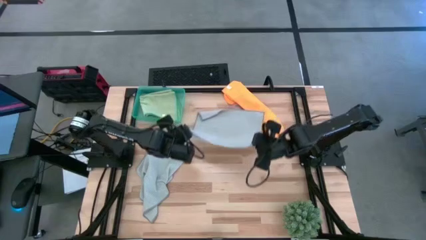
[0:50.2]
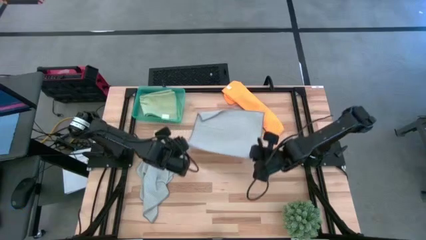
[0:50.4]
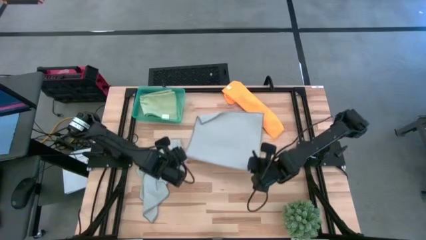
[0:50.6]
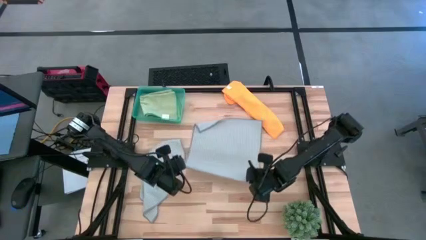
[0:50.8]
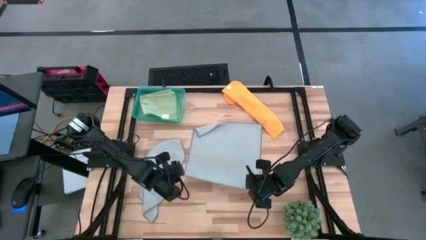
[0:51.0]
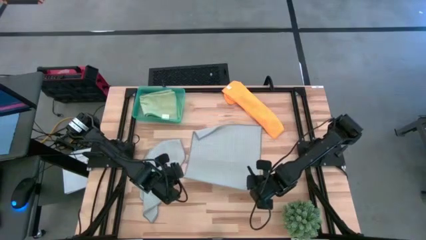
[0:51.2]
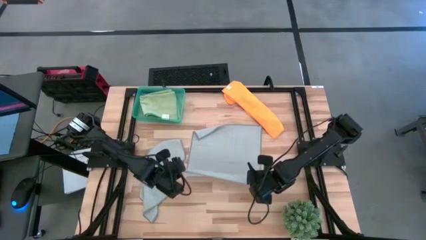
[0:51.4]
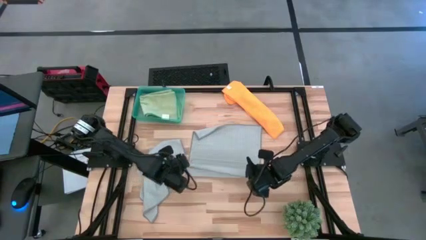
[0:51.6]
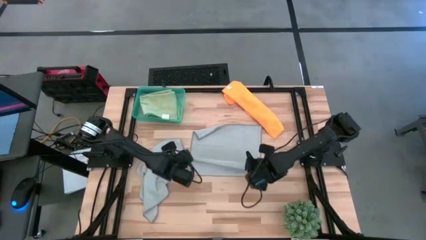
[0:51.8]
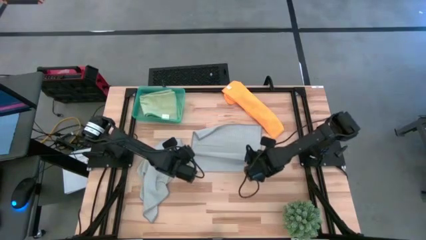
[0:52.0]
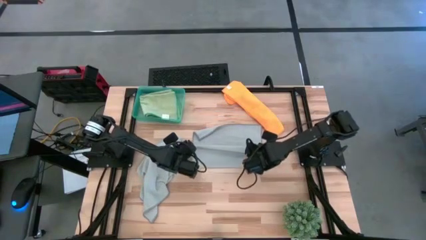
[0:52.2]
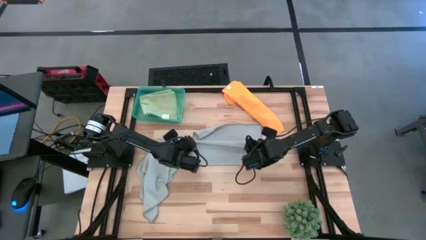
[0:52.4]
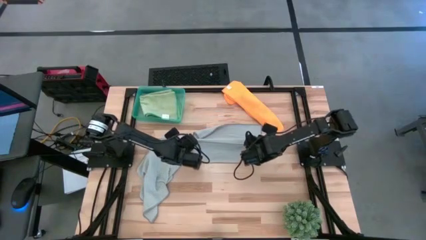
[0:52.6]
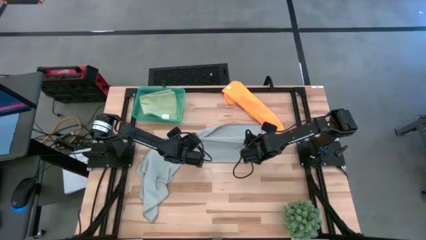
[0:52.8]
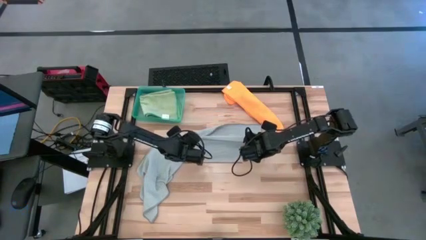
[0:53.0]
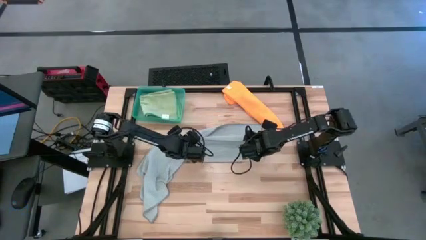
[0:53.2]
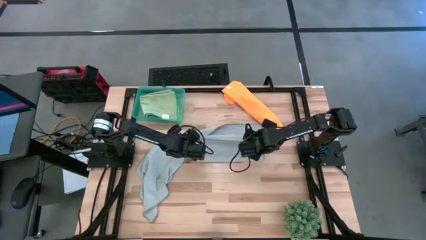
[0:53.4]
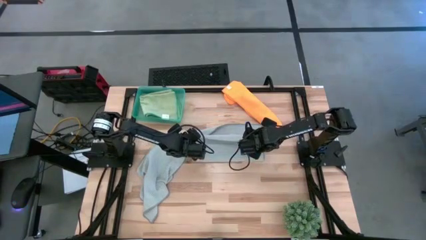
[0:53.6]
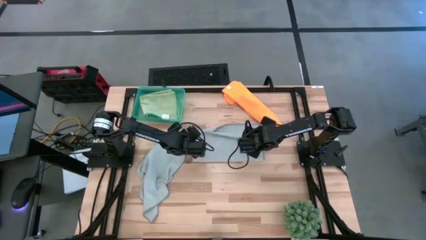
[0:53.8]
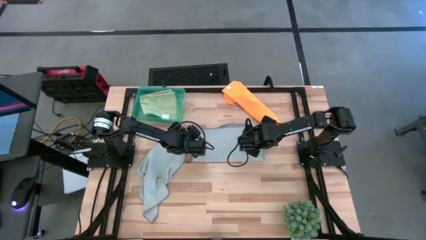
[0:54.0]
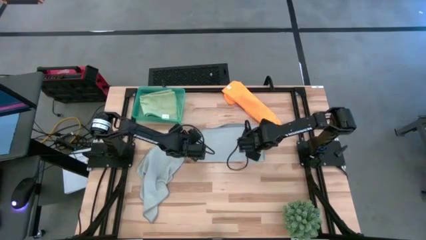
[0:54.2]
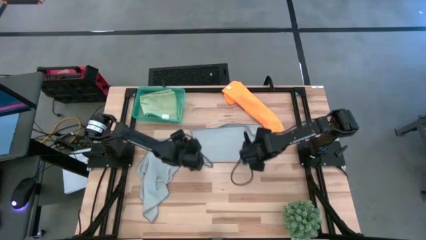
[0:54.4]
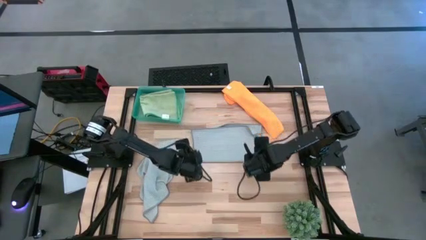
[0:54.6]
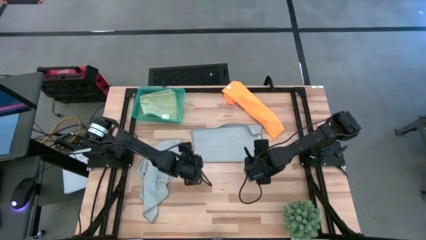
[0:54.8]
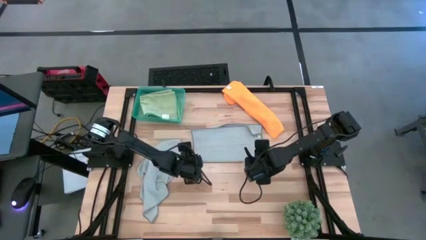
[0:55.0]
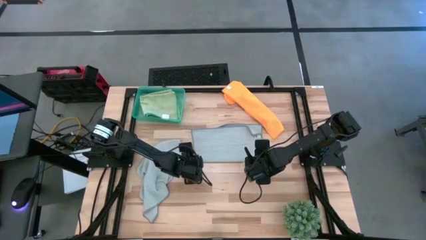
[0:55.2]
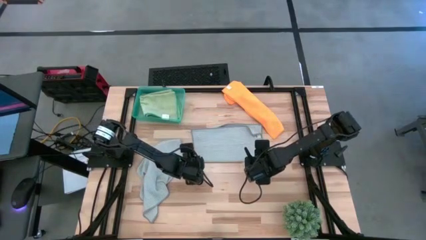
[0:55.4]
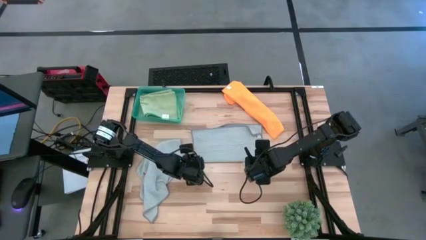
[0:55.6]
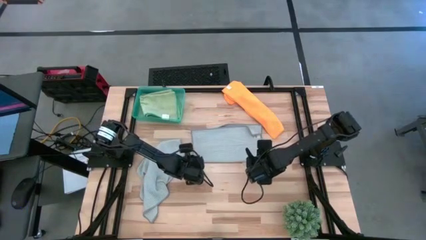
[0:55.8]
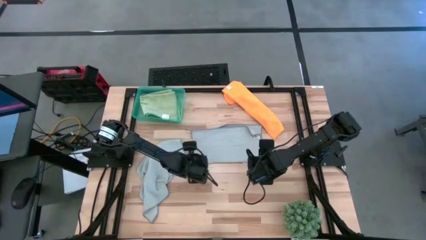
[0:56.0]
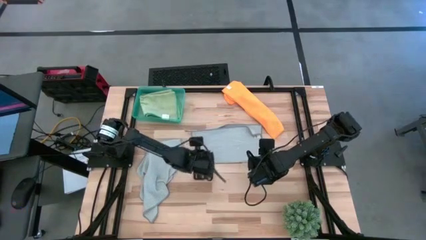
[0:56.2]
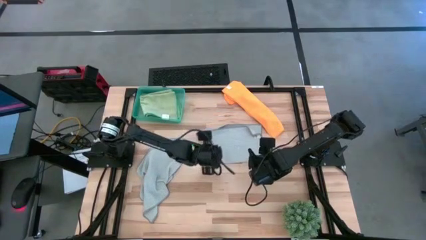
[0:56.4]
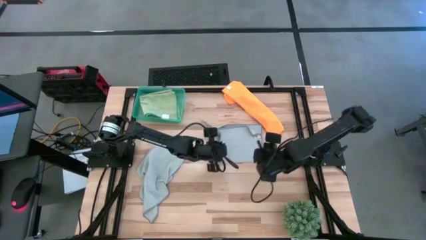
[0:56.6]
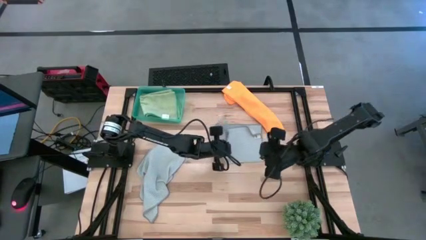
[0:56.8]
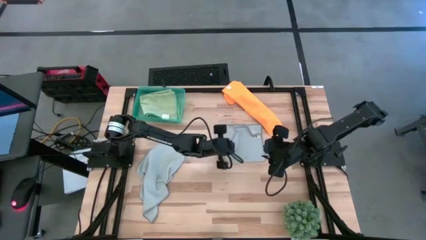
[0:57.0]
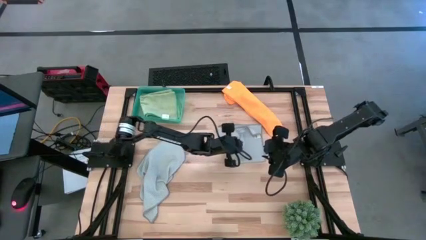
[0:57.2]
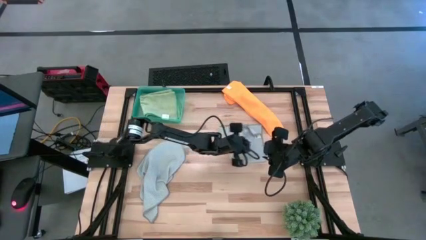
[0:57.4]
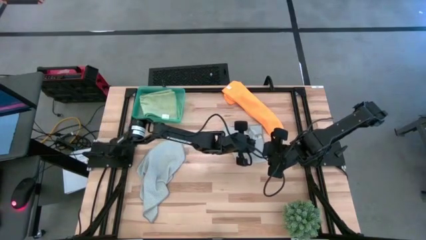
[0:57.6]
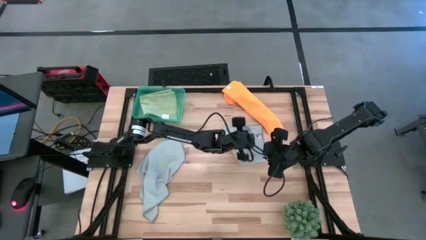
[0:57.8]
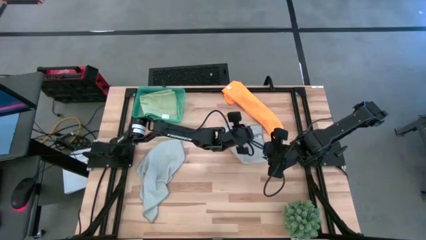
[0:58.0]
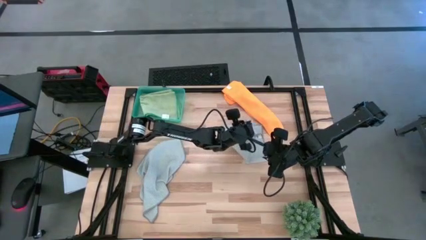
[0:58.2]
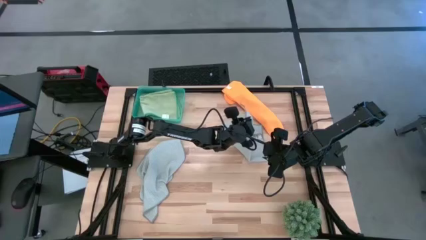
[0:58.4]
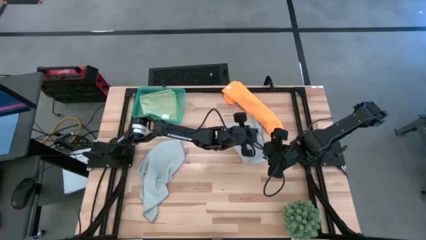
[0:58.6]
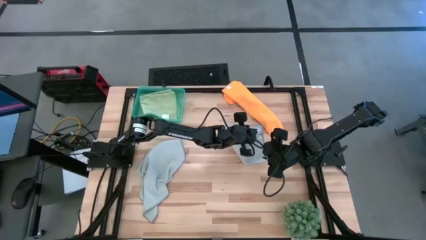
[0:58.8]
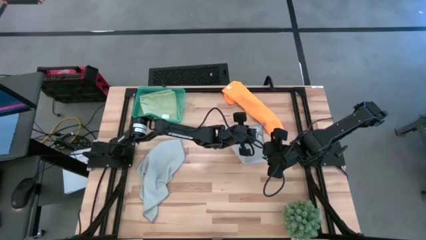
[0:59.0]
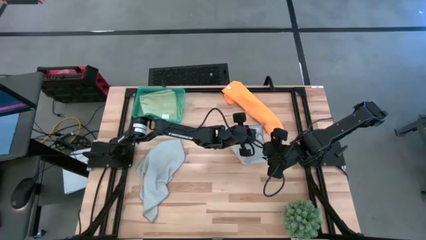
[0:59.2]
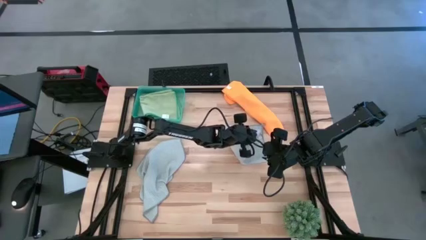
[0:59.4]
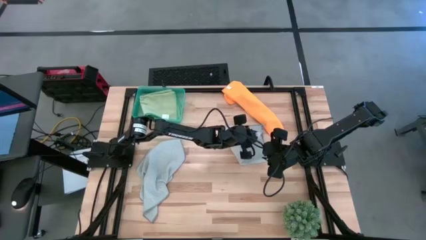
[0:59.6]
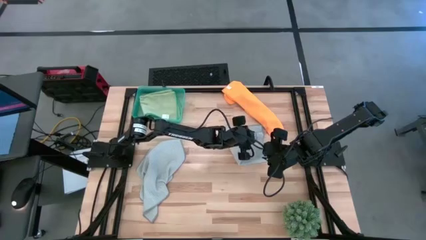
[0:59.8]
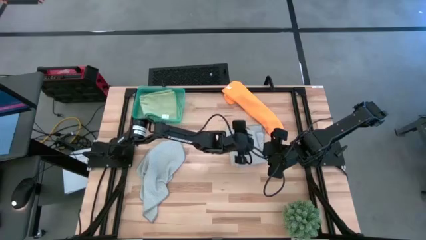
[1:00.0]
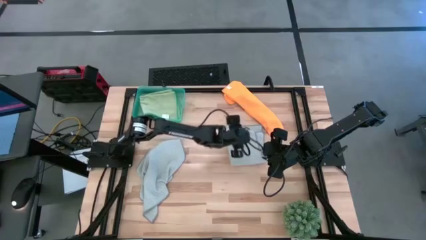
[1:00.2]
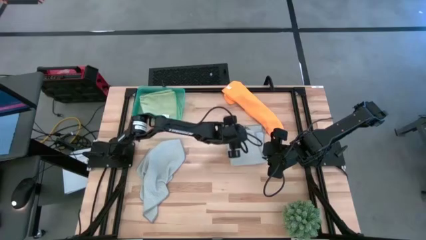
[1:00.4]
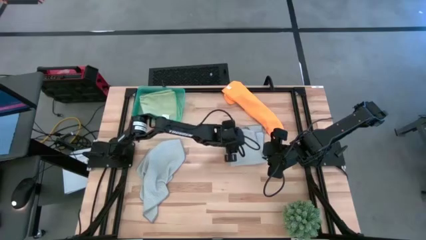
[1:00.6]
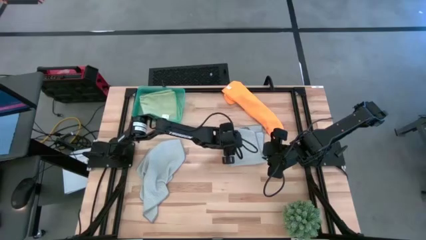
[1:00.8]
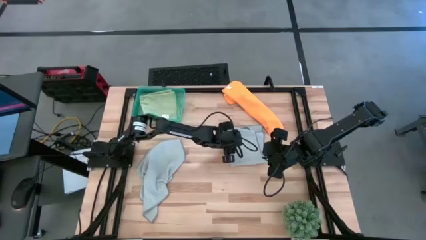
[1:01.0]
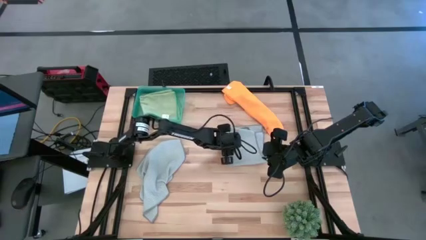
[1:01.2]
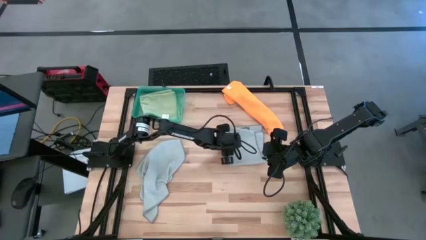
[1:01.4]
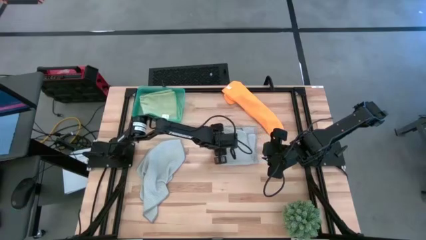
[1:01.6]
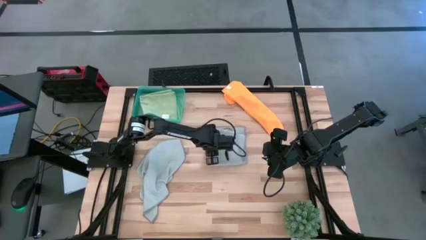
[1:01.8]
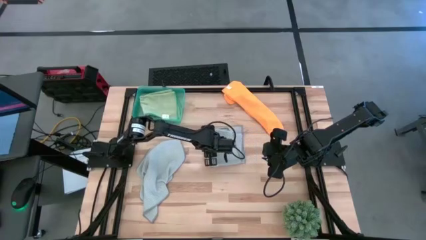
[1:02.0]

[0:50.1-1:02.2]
Task: Fold microfiber towels
Fold the right gray towel

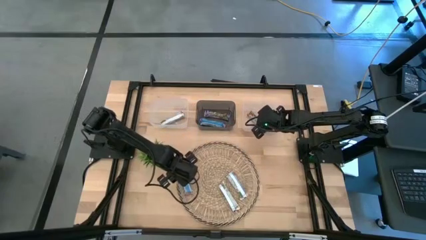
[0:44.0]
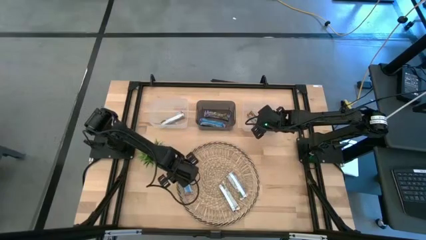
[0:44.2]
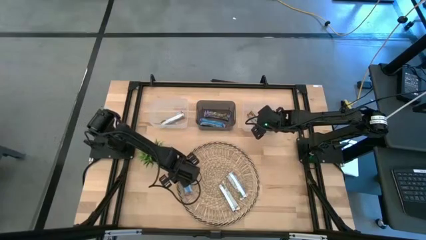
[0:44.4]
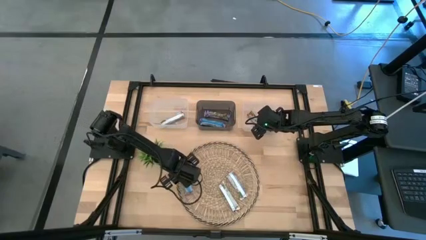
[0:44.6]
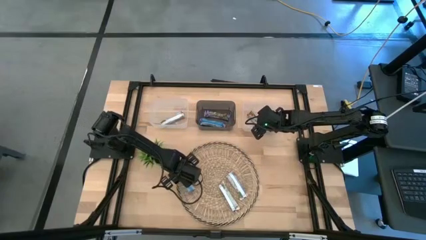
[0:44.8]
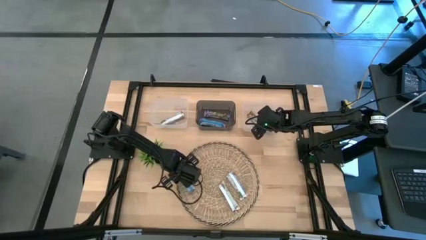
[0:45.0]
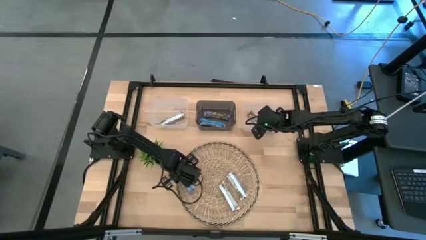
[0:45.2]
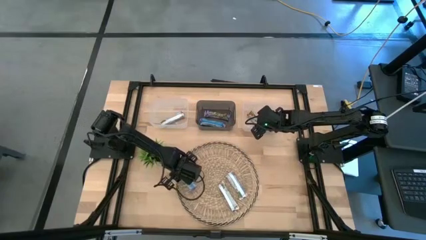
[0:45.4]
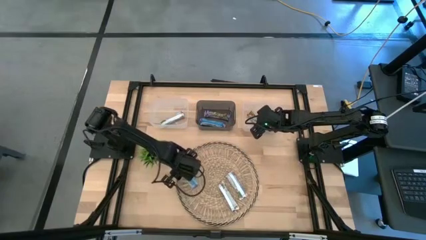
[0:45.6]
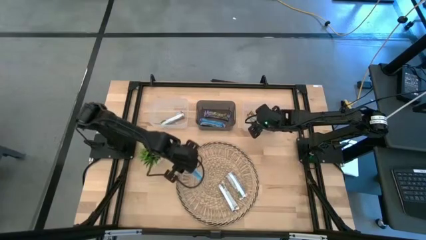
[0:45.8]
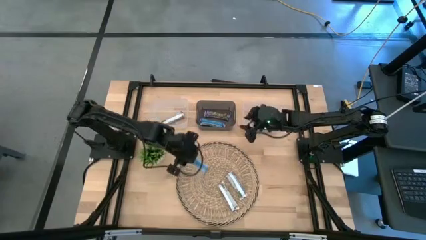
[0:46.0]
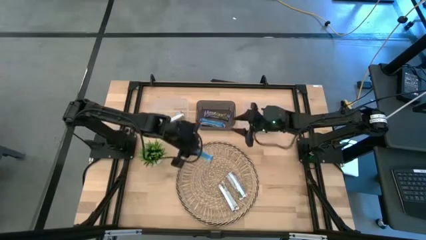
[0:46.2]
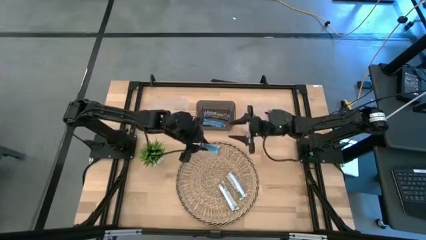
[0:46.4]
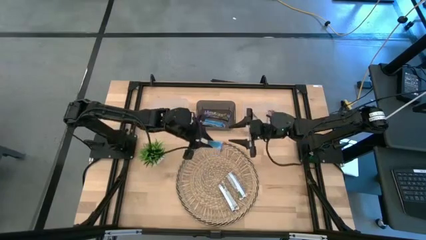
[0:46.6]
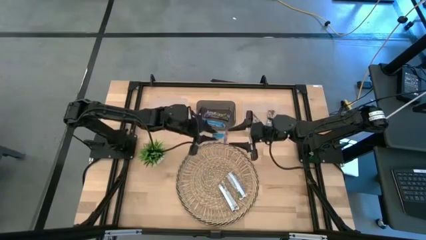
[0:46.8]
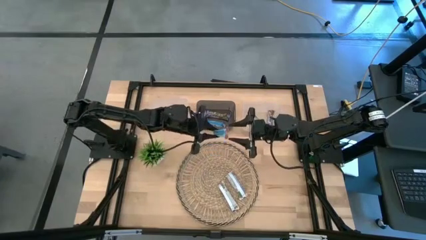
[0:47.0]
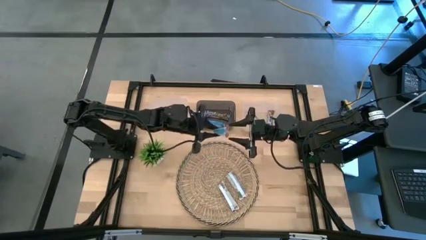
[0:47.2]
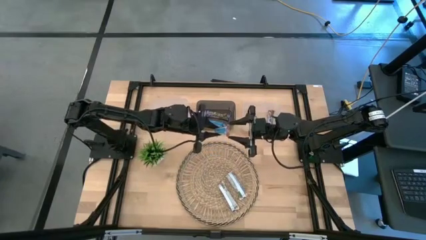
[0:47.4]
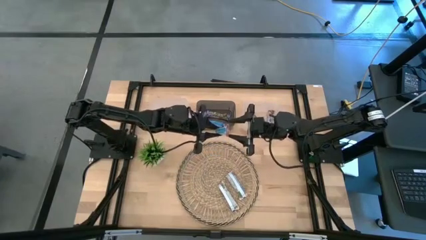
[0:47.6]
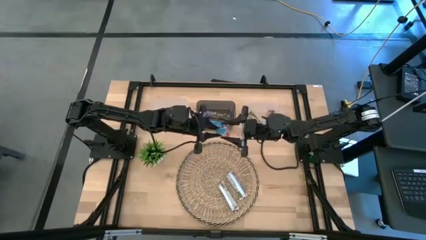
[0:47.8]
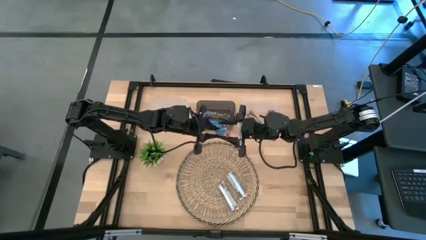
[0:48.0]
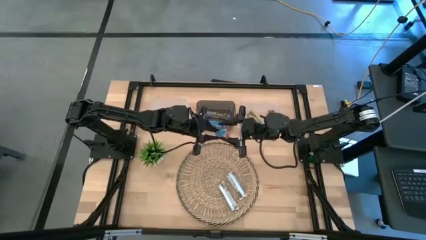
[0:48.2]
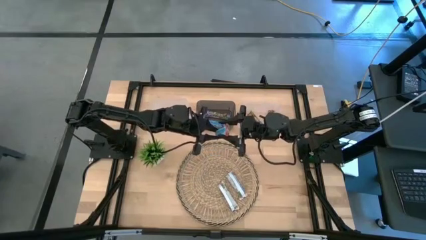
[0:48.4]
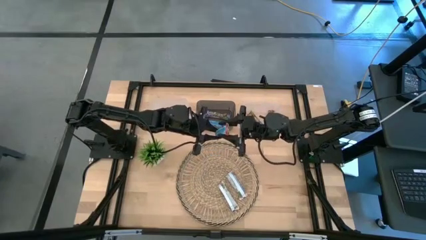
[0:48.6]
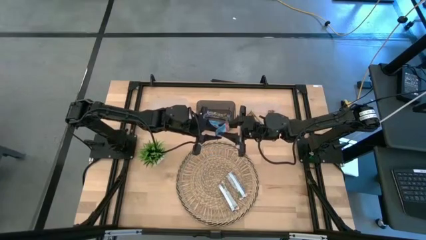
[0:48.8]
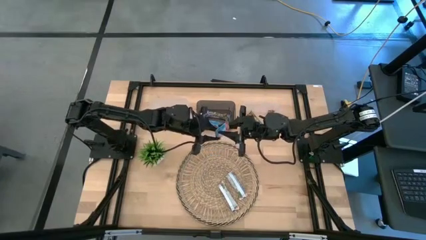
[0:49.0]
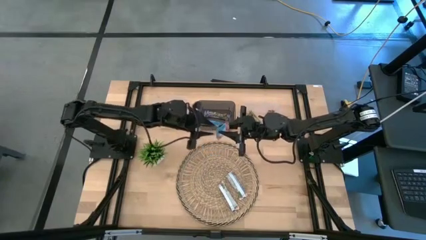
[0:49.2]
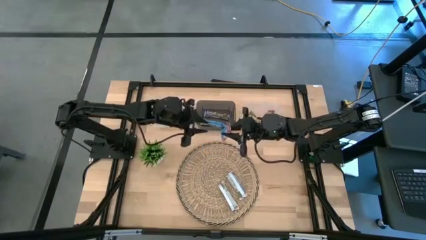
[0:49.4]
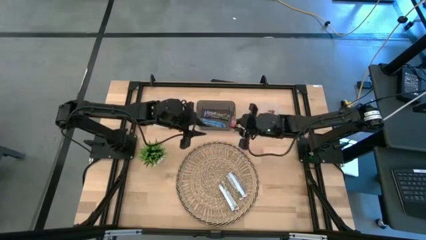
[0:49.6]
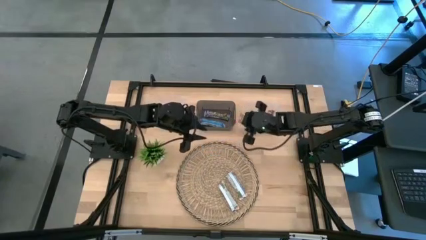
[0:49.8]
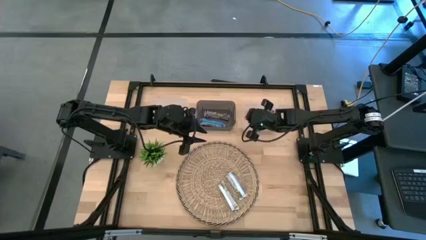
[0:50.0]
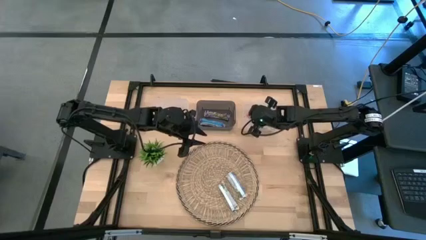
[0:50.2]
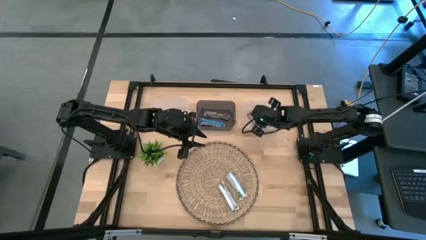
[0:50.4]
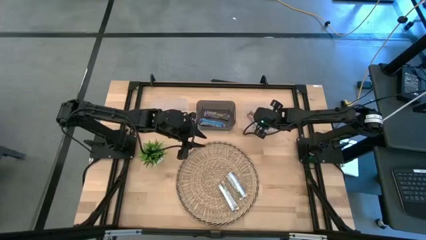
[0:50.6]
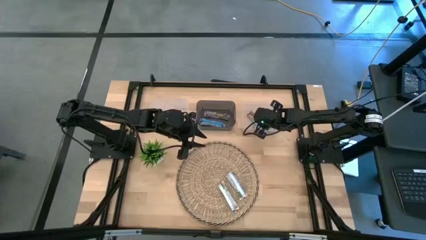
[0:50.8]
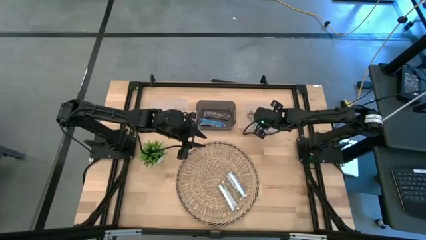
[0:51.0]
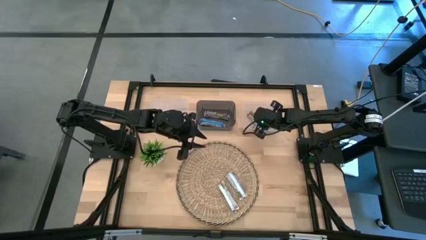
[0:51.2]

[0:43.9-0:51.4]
Task: Pick and place Granola Bars by type
Put the red granola bar into the right transparent bin
